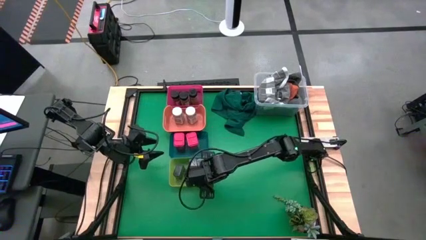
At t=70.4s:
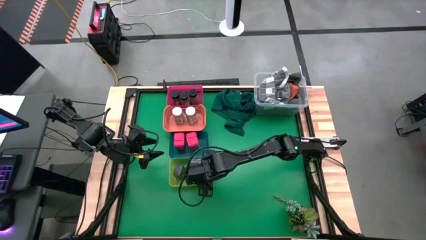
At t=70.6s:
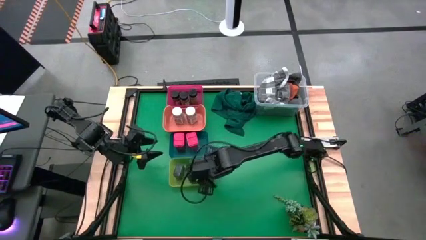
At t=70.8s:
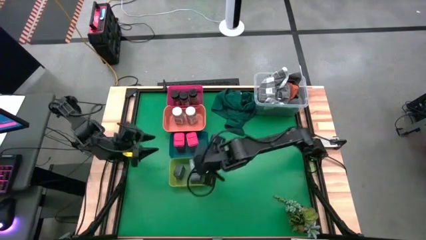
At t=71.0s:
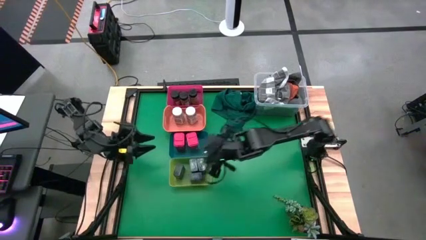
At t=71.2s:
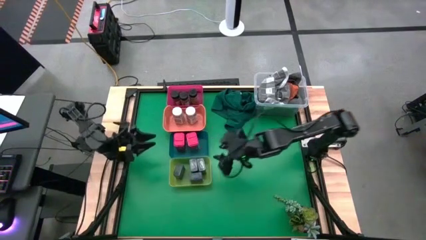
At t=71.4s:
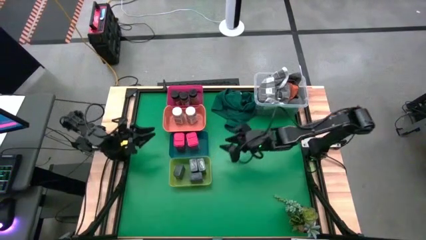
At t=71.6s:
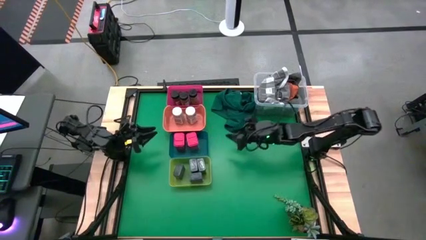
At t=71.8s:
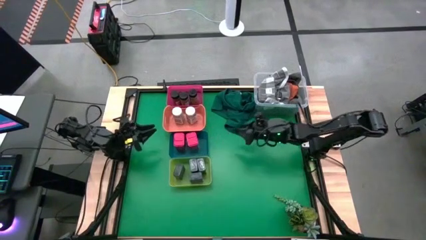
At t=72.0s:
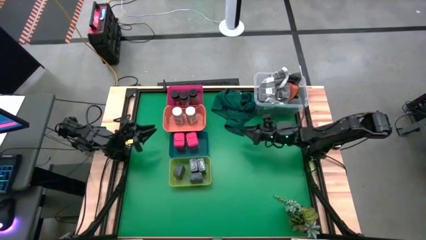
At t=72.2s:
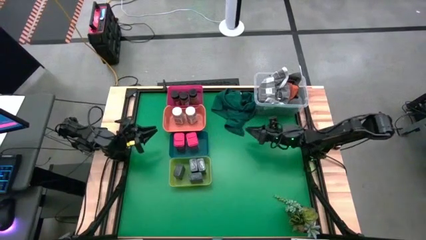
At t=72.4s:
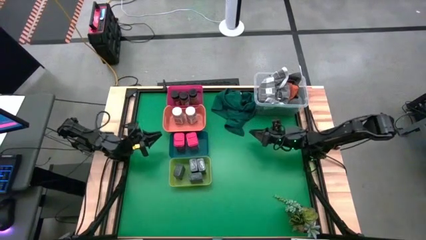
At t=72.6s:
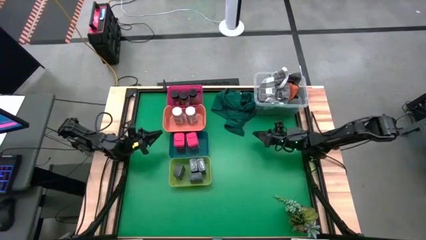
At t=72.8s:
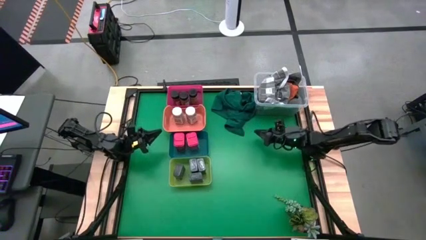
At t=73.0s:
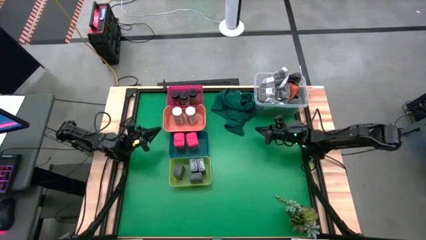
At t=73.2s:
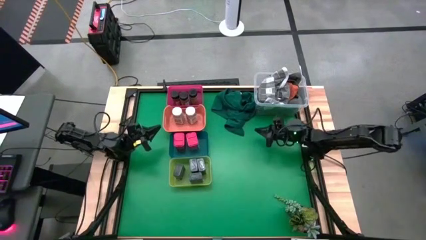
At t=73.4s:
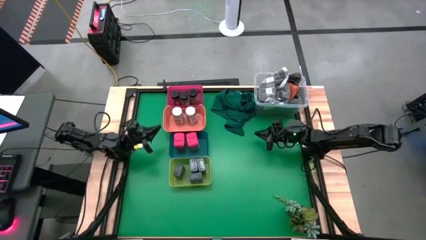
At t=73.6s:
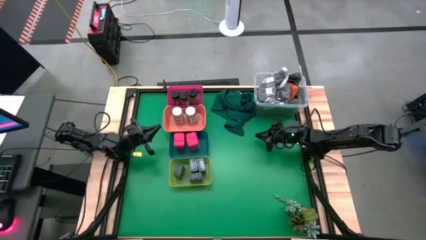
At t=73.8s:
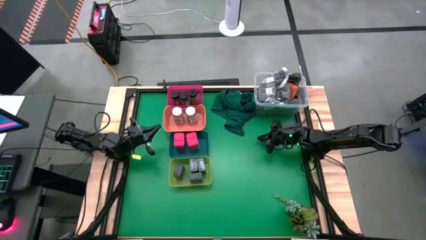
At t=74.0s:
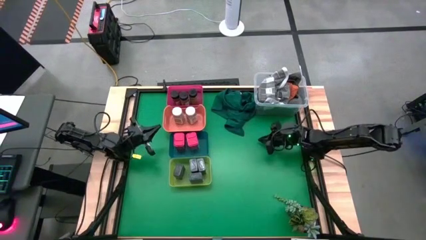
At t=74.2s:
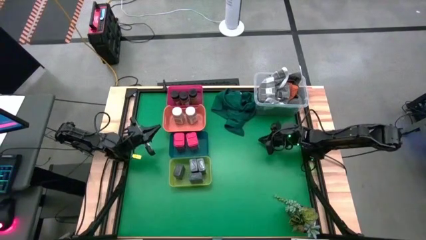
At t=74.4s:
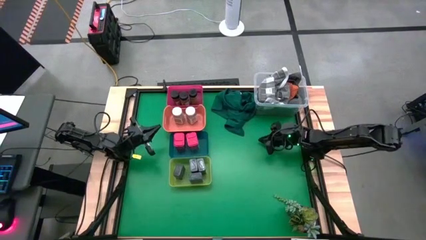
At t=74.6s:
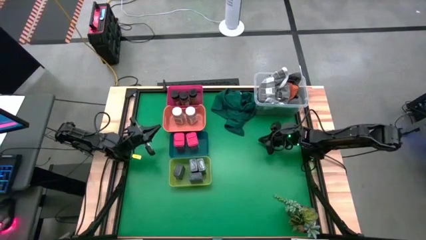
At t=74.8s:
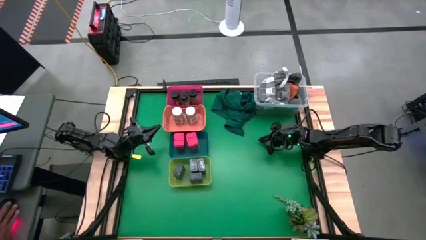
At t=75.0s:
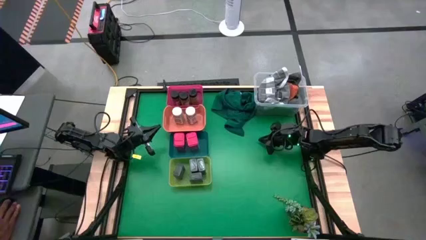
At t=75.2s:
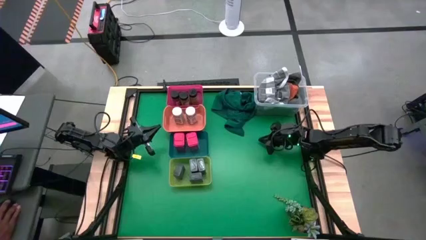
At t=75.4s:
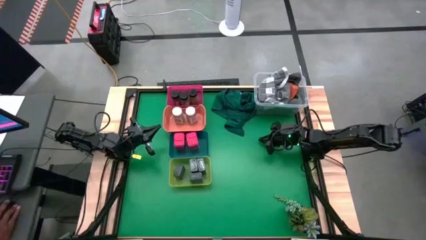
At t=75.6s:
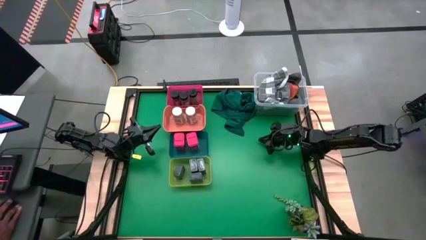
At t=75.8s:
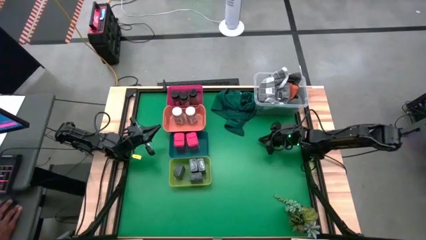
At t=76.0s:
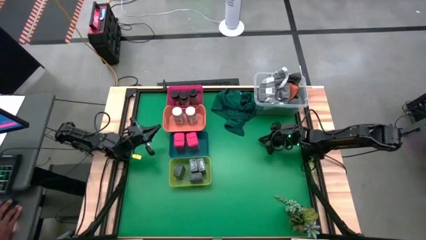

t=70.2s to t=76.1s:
Task: Sort spices by type
Return to Home Position

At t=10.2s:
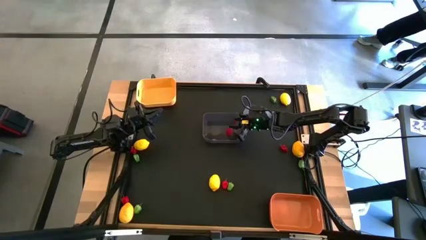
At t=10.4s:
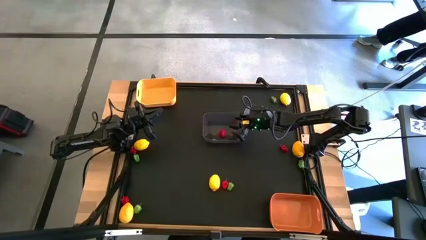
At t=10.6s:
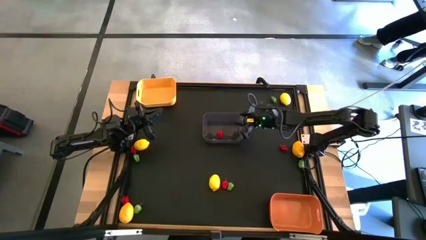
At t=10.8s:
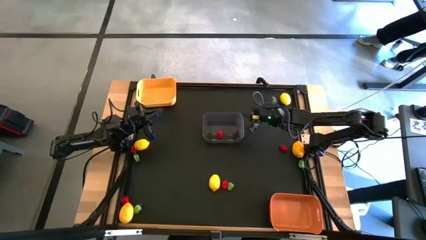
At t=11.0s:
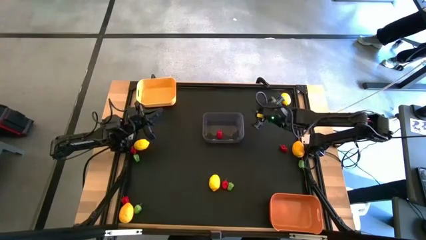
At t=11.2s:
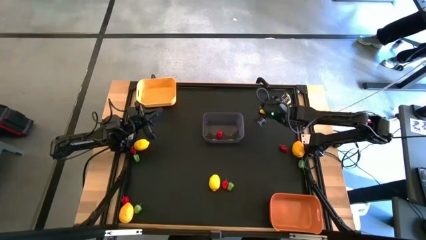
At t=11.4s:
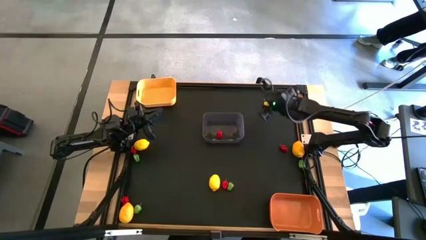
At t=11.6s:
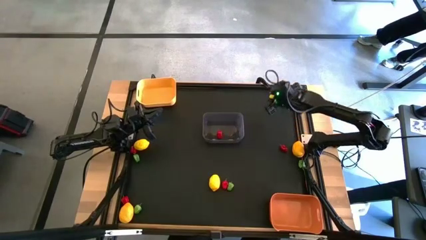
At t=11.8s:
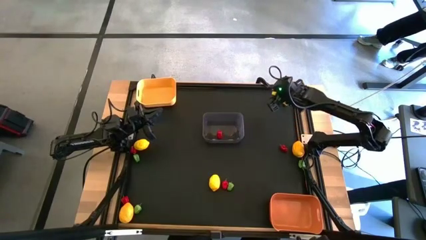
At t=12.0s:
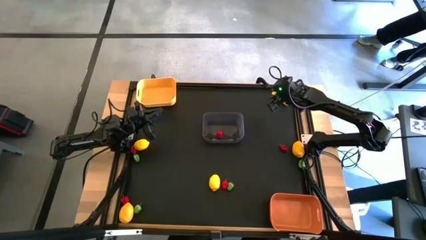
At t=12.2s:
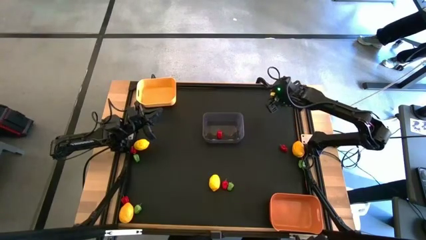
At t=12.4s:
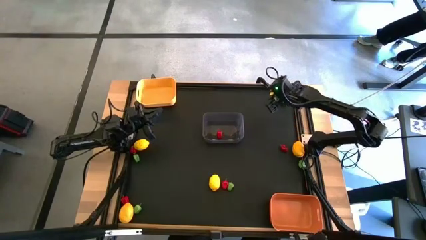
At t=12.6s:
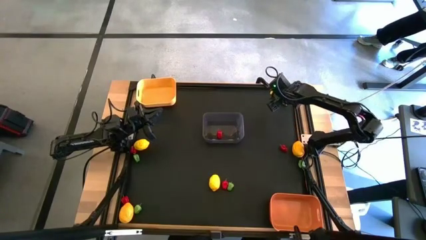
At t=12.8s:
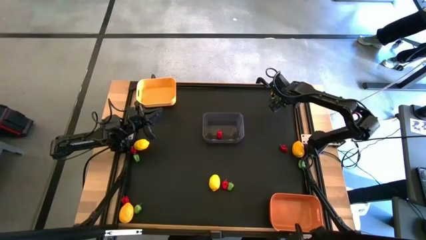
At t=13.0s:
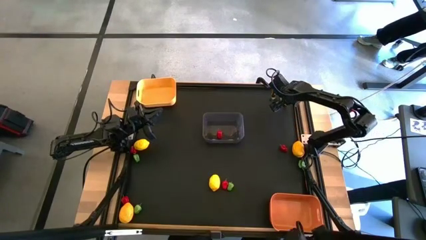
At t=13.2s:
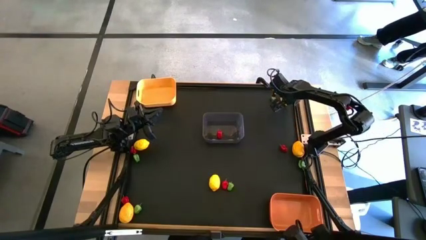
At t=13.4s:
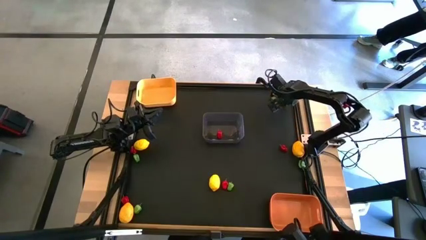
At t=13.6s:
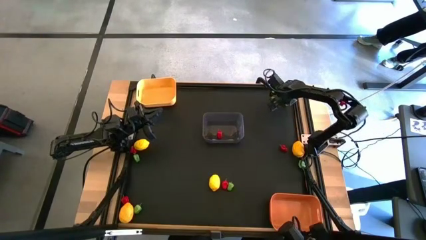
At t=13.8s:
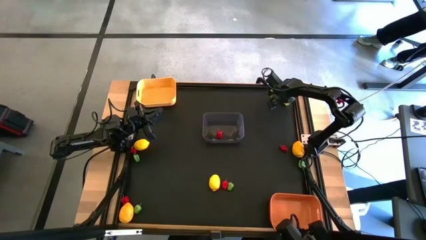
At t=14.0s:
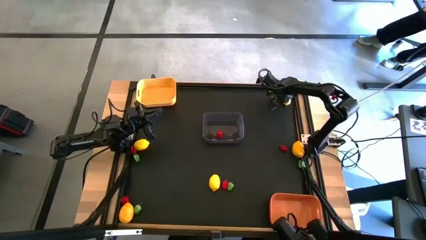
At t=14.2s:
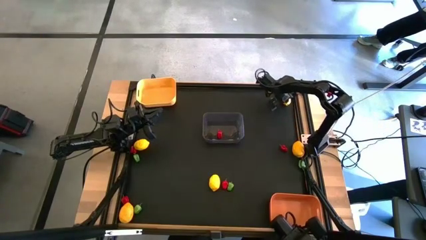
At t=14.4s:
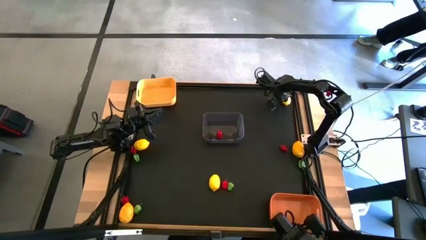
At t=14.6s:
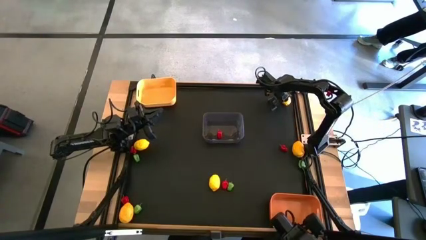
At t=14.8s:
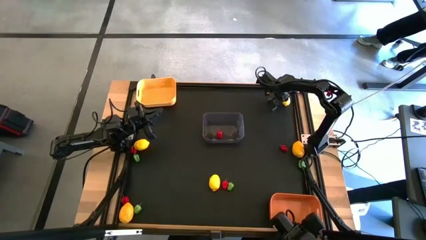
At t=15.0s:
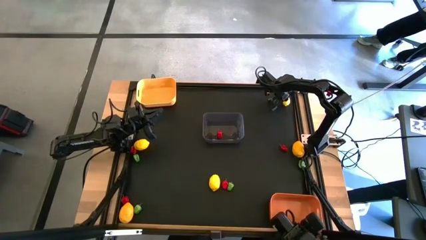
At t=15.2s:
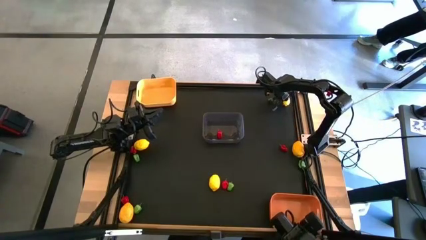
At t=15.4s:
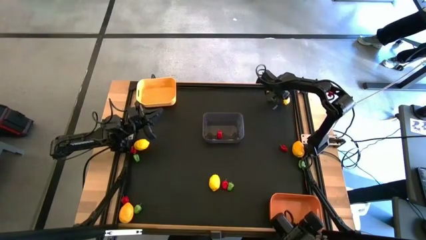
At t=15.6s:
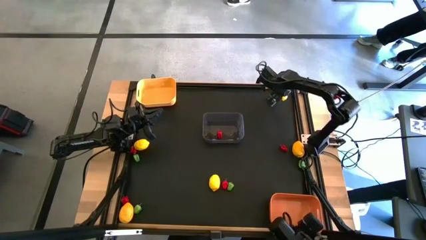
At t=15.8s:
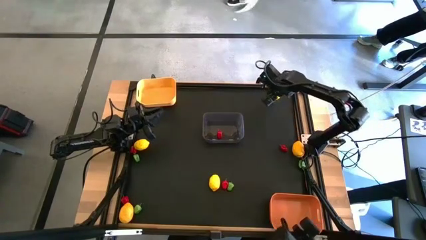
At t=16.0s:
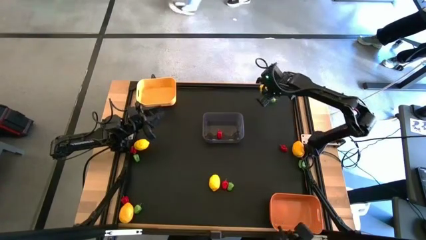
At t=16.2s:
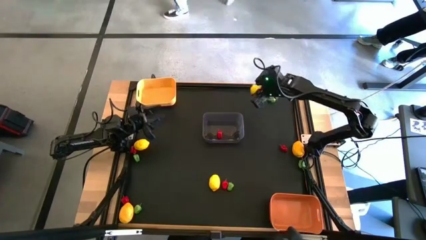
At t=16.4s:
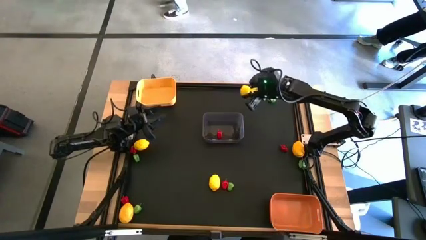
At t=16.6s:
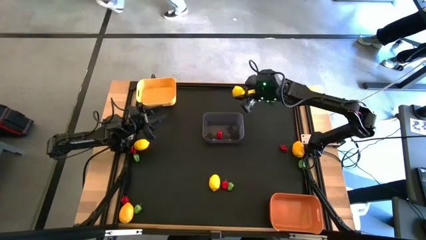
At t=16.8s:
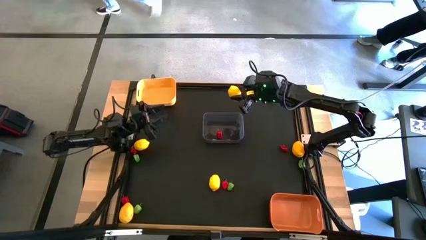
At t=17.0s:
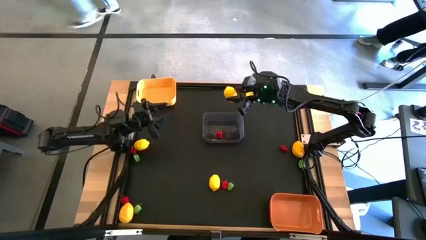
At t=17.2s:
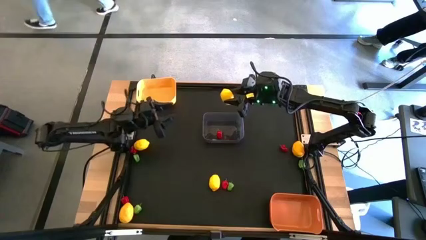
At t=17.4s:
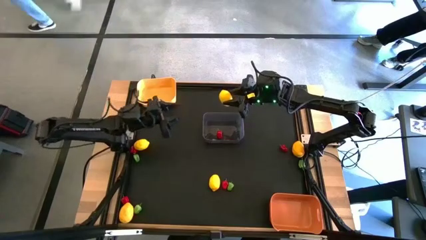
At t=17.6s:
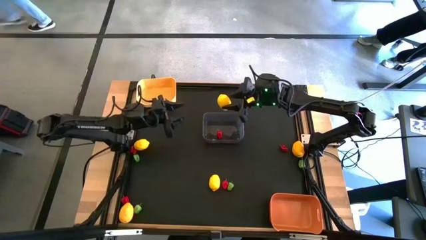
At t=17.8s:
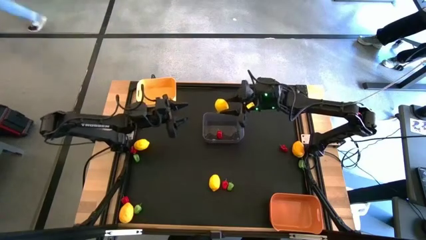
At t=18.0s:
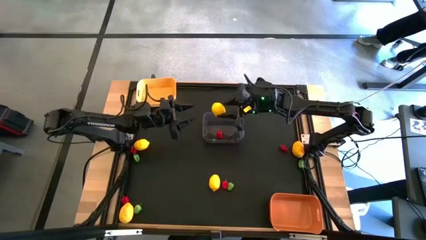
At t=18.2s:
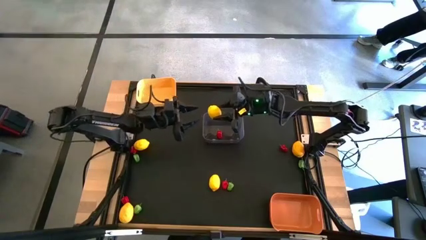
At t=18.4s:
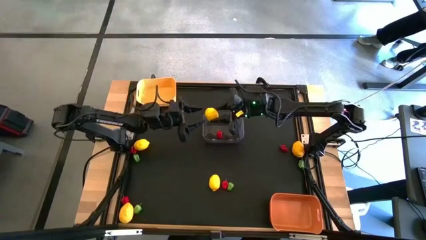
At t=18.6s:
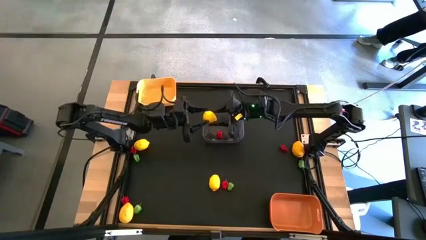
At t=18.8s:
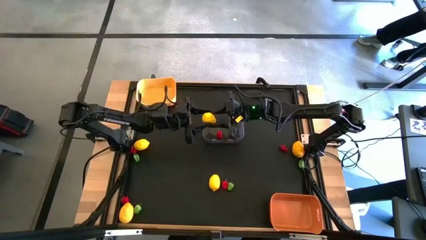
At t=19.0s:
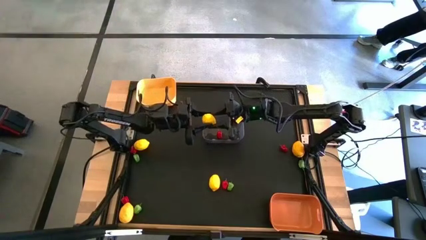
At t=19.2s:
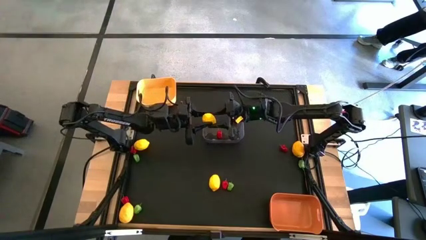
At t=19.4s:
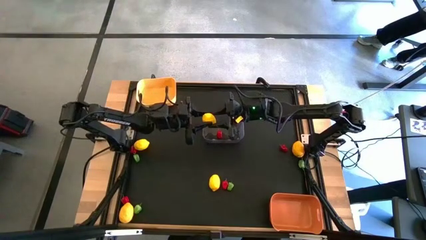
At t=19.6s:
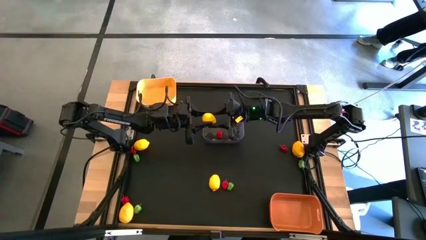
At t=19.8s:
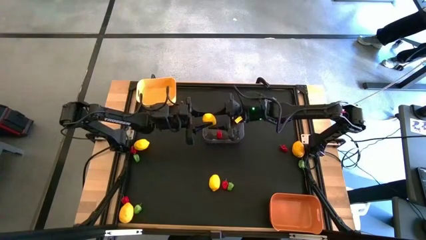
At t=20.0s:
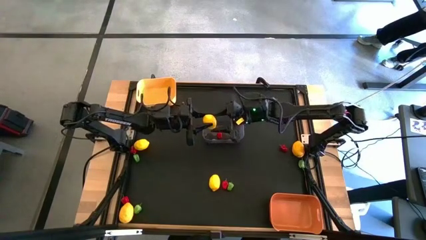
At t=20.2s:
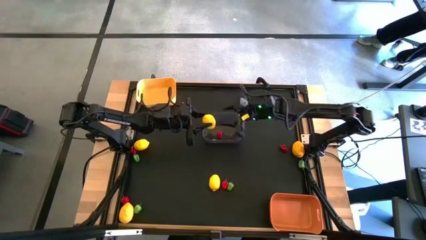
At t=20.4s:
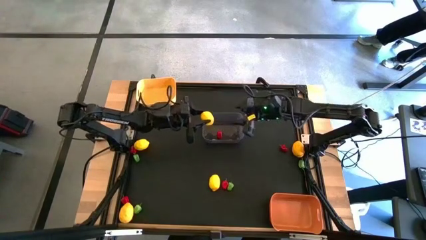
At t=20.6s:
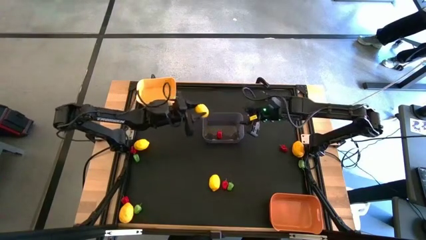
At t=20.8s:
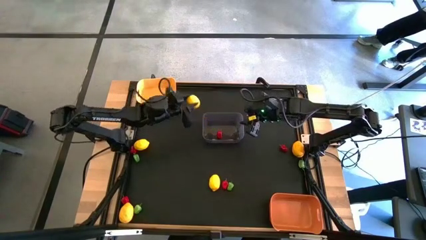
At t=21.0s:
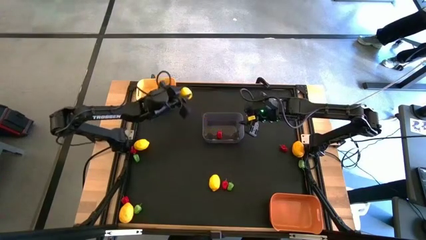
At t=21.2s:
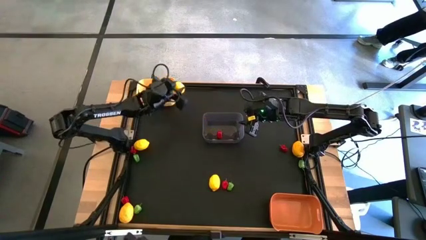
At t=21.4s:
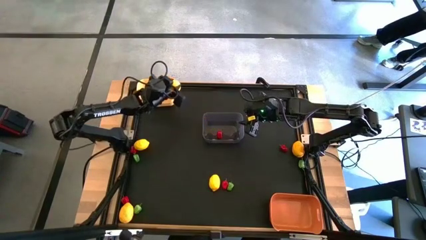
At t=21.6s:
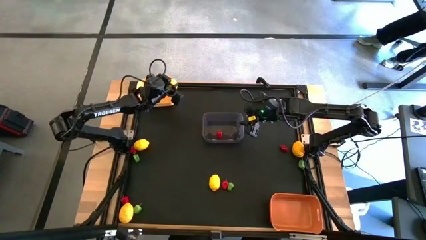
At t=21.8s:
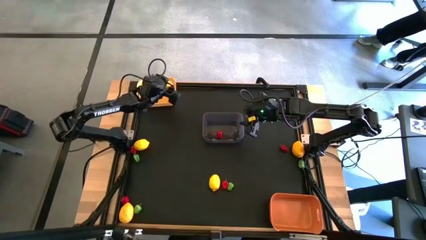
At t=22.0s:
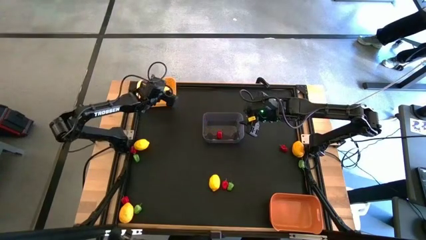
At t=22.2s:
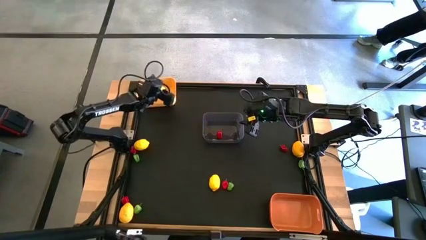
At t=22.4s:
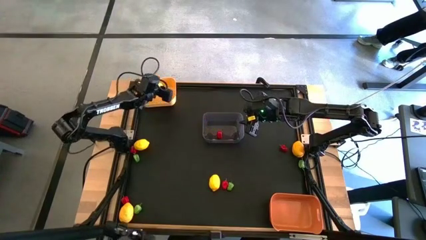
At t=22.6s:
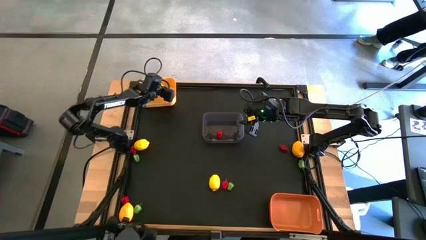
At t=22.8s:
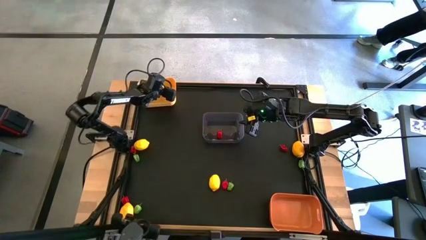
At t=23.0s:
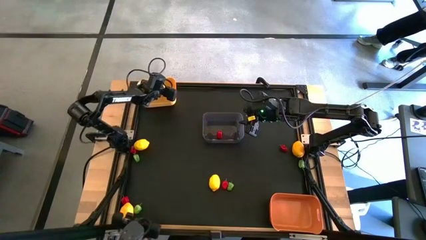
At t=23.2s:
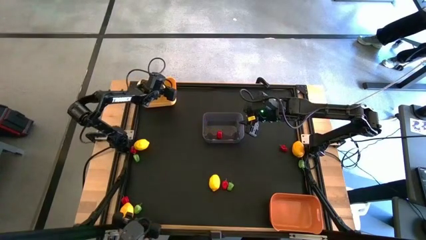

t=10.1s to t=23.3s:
Task: Sort produce into baskets
Put the yellow lemon into the yellow bin
